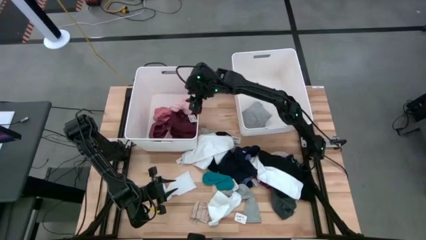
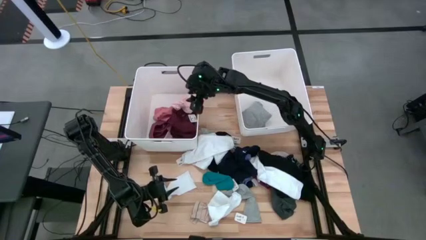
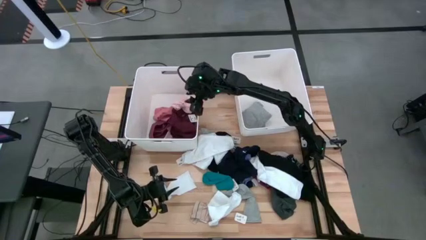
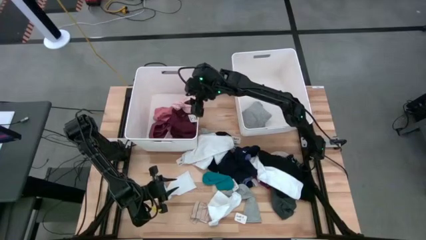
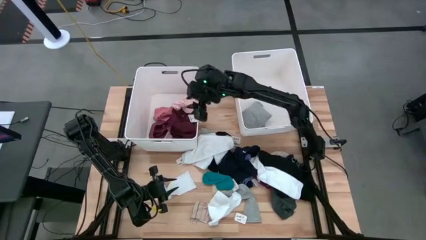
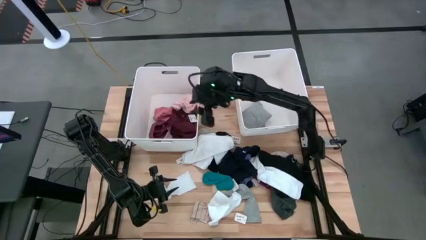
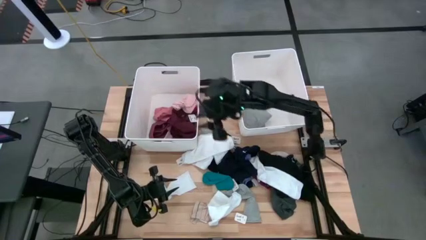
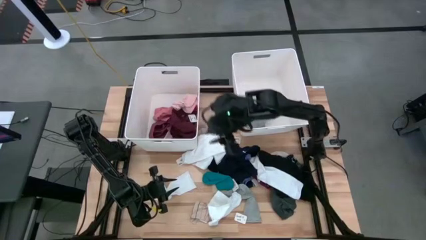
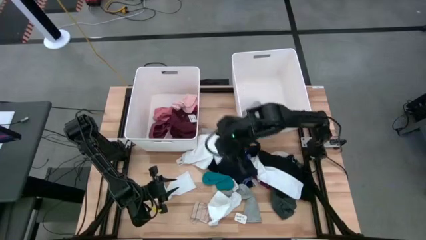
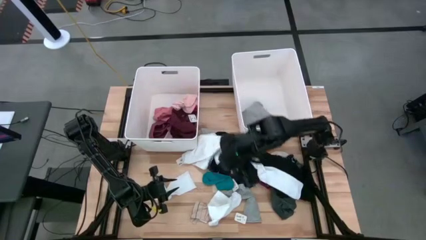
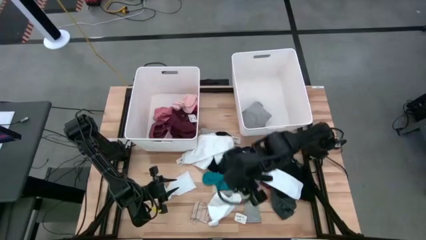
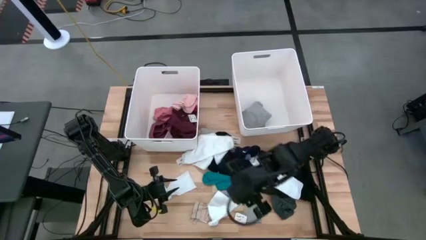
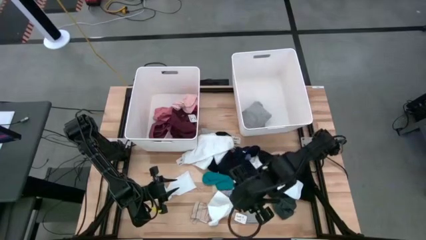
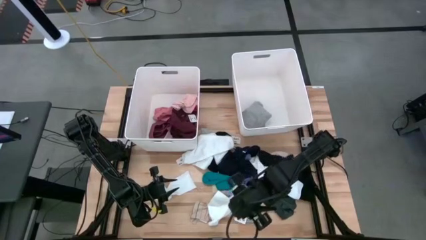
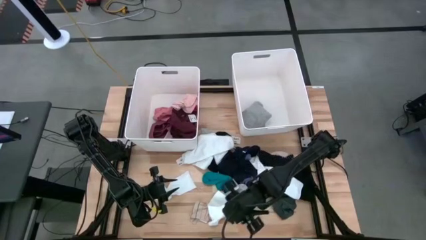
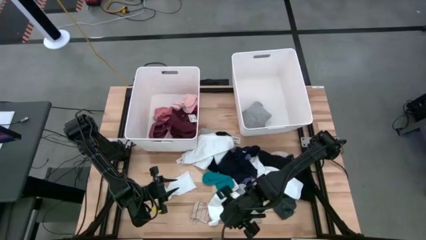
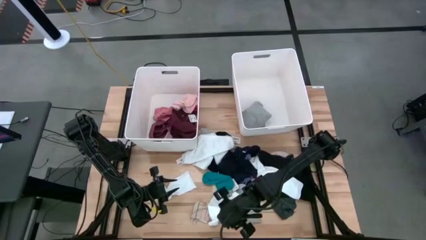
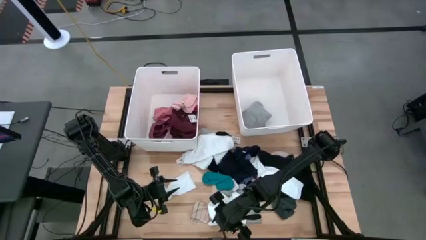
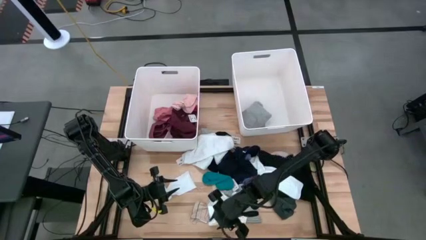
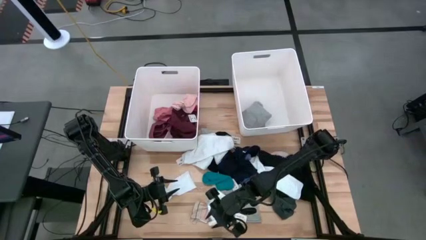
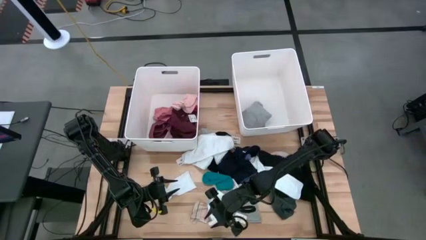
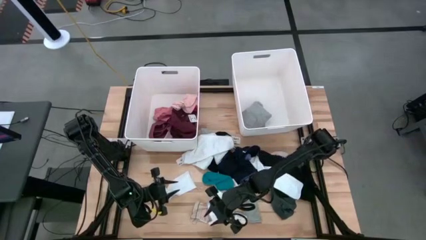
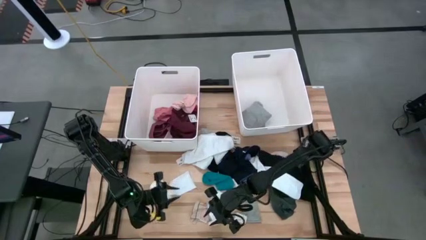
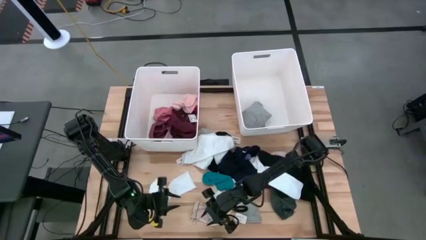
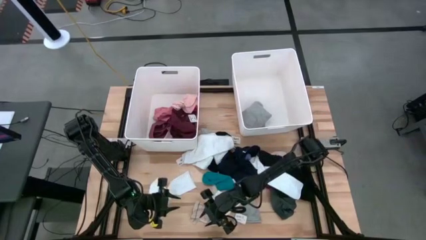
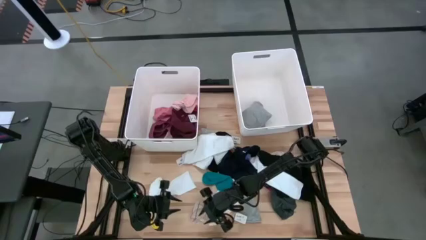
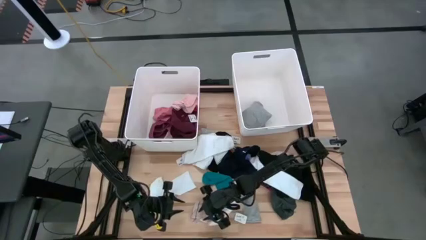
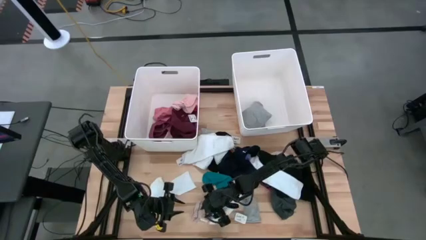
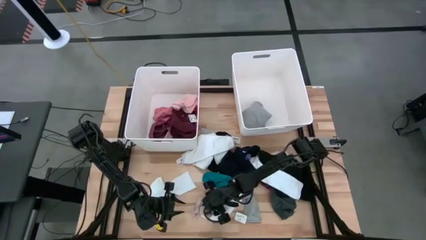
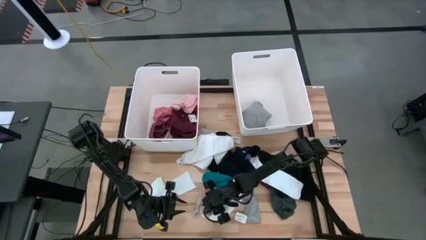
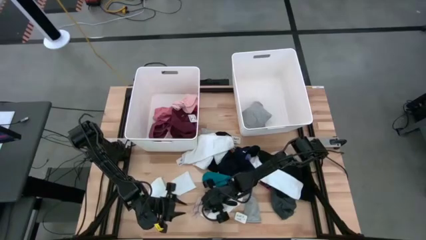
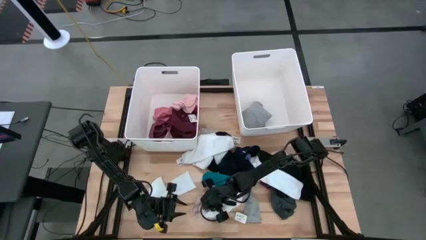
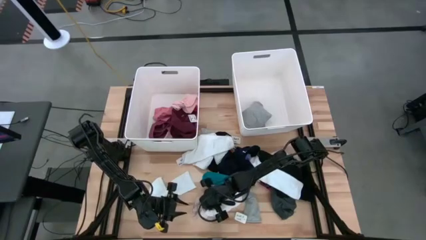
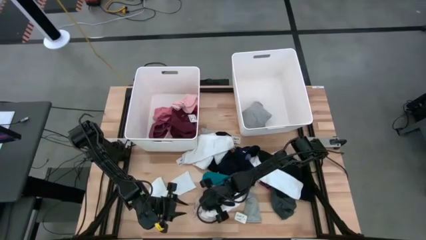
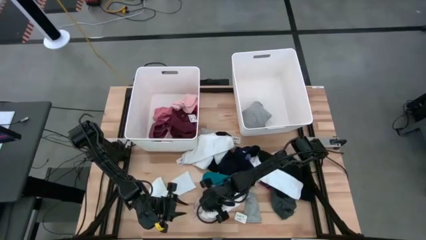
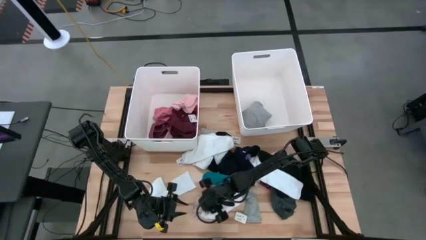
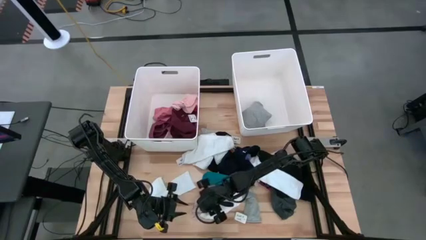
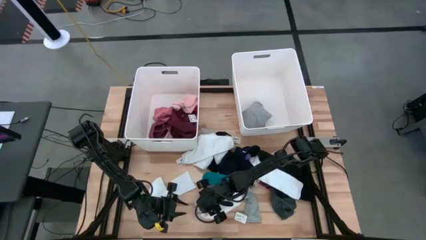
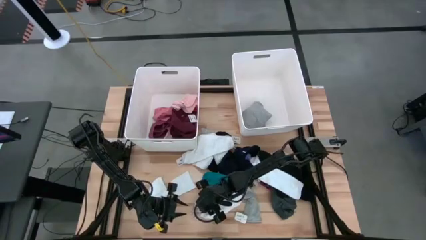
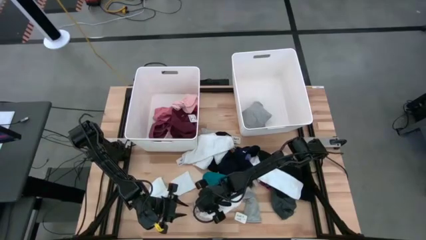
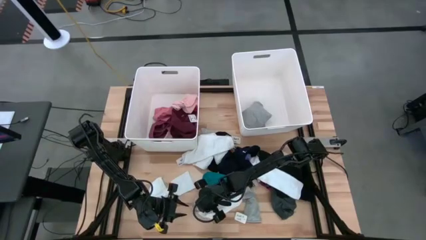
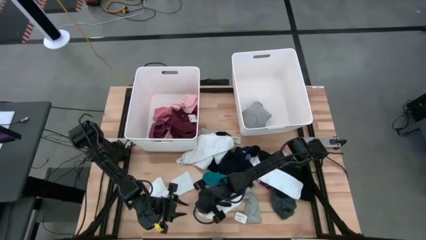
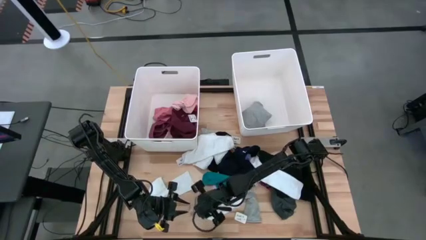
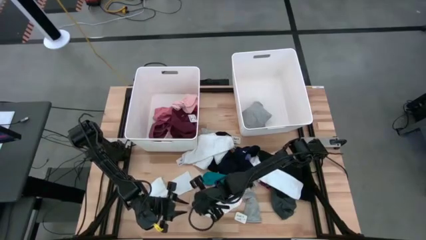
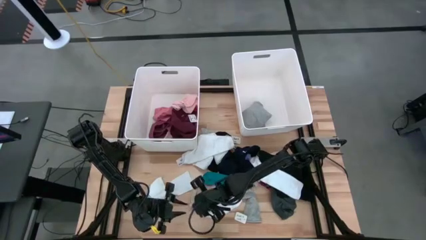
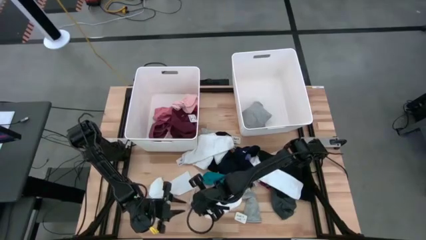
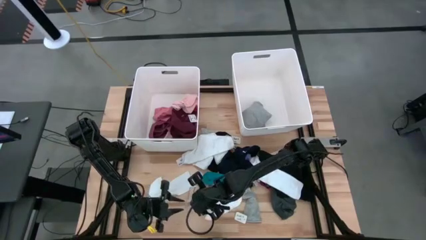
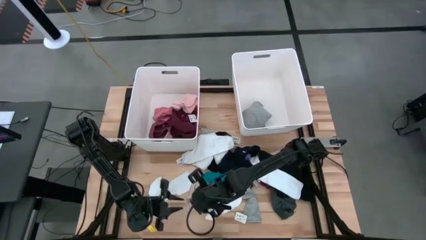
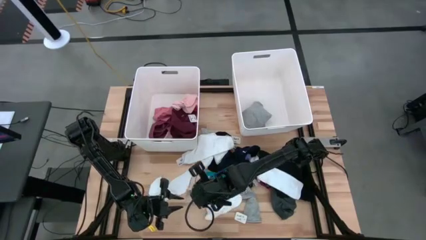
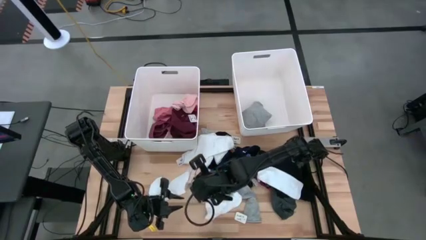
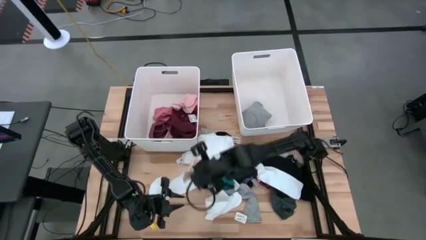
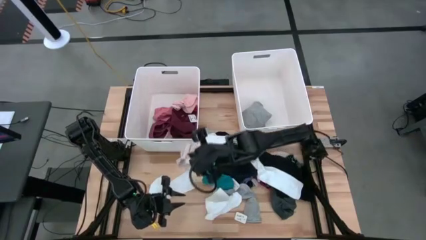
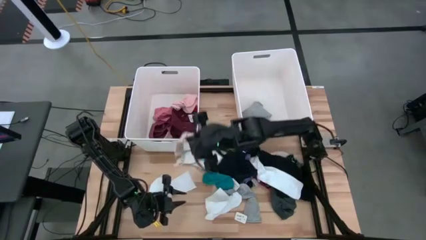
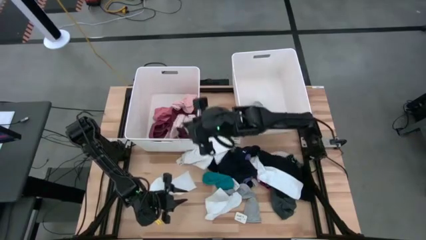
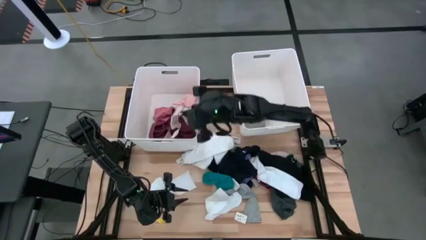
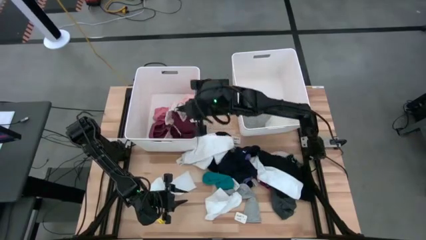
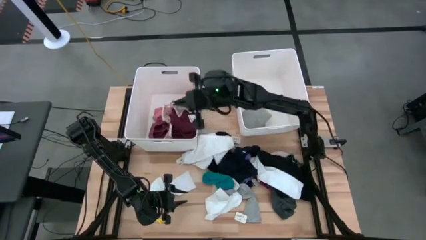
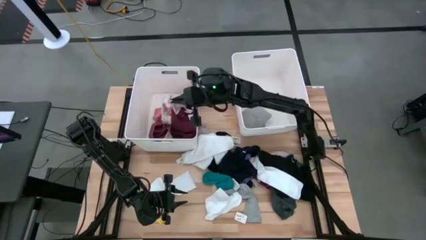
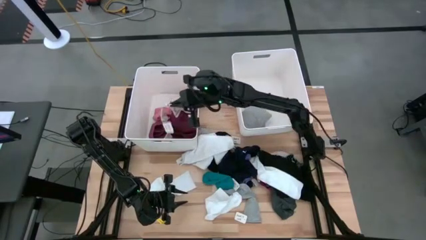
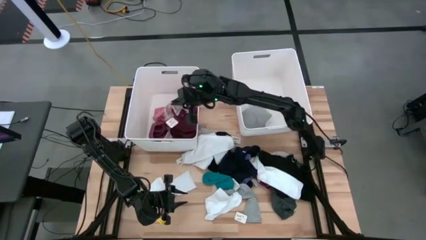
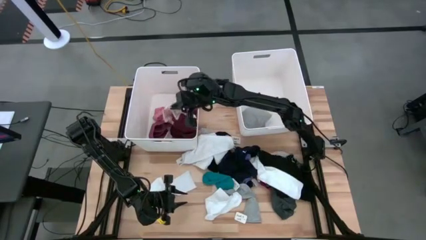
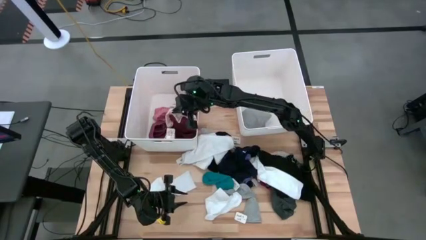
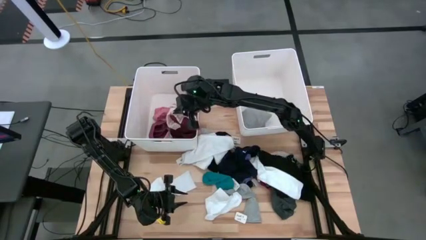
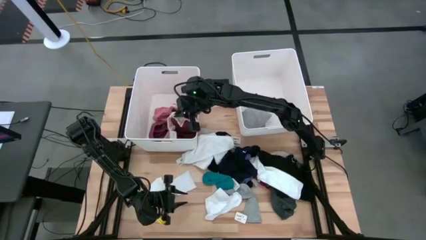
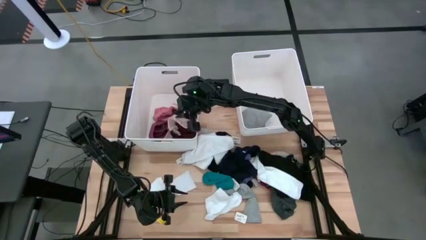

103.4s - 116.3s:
Task: Sort clothes
Put the brown sock into the left white bin
